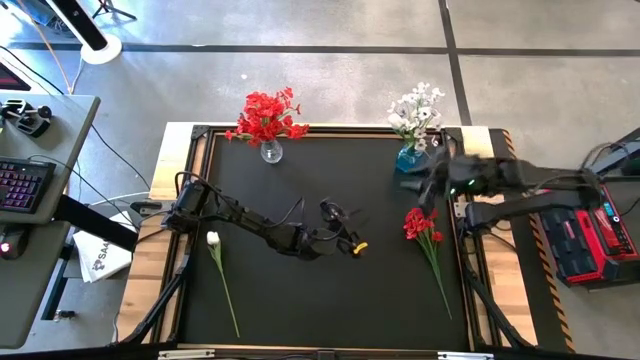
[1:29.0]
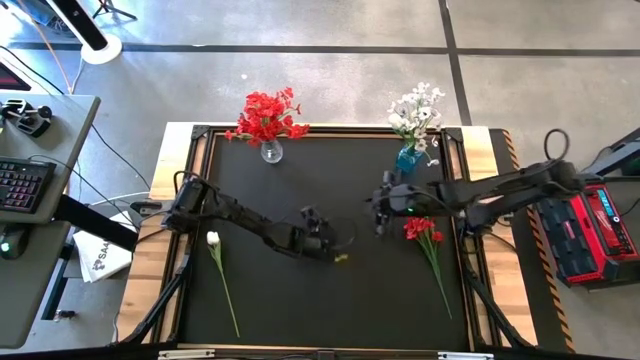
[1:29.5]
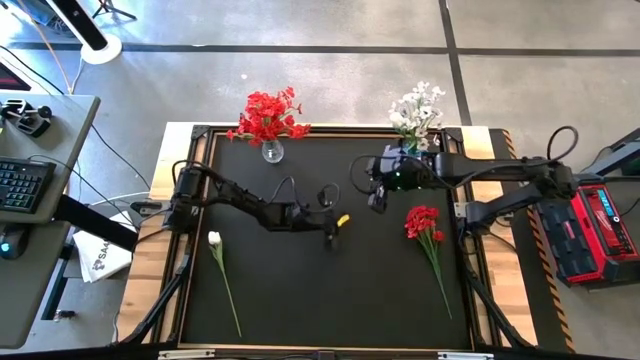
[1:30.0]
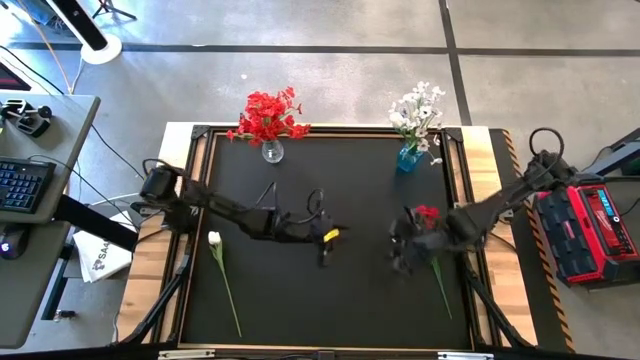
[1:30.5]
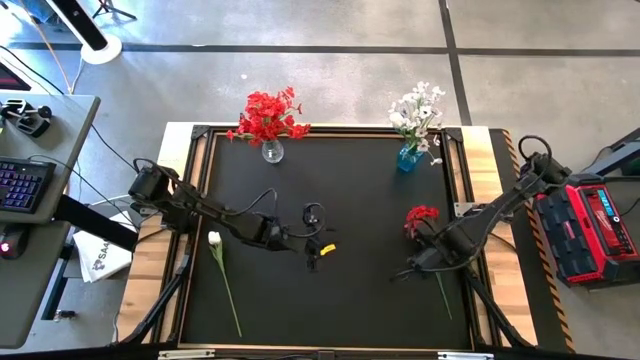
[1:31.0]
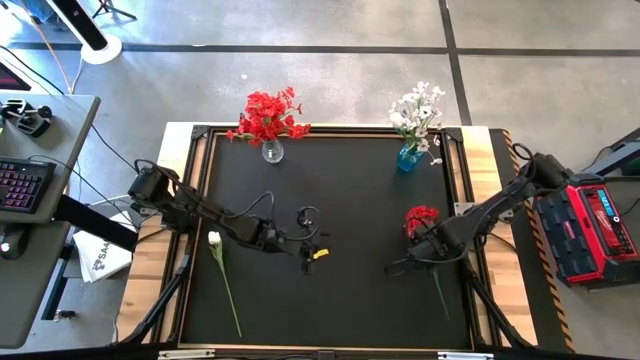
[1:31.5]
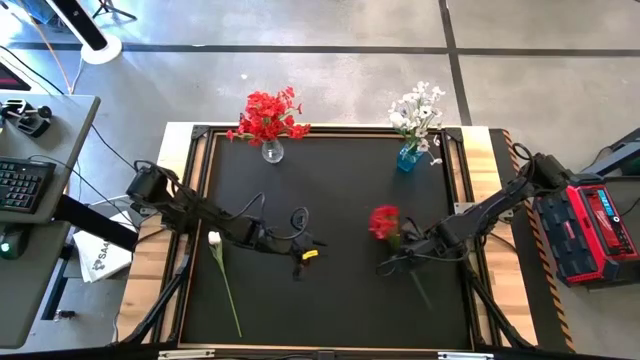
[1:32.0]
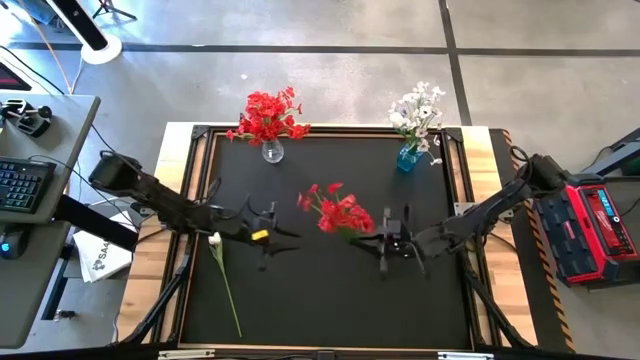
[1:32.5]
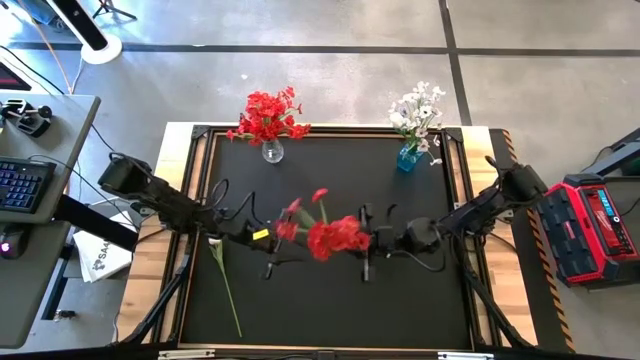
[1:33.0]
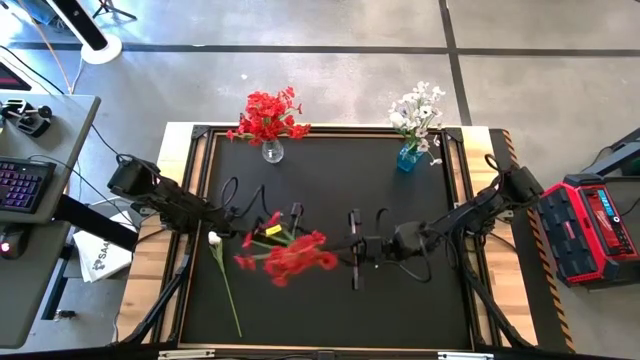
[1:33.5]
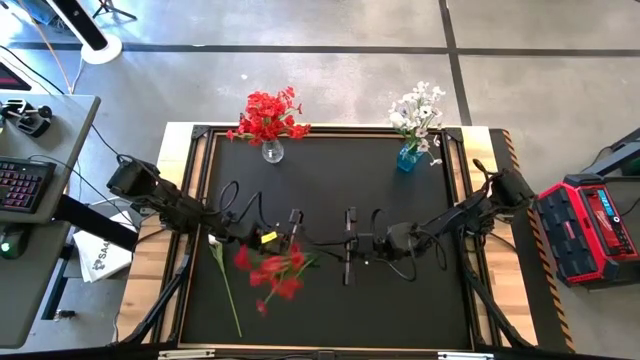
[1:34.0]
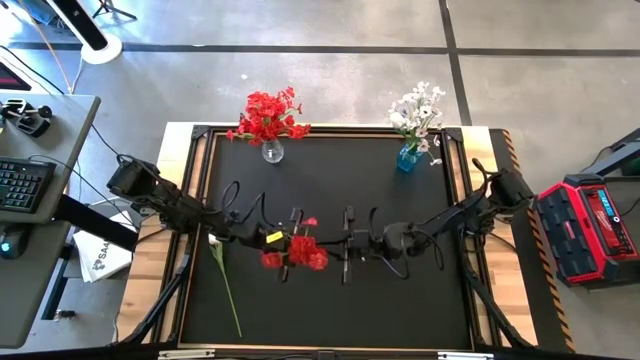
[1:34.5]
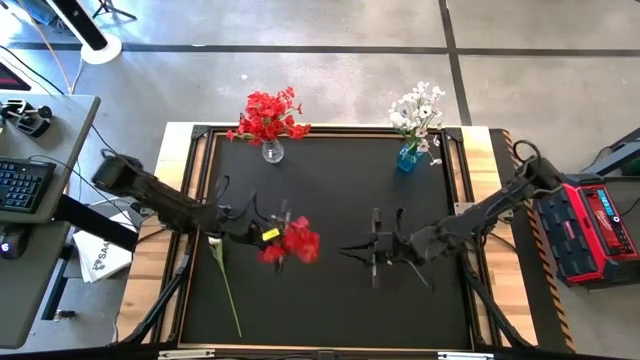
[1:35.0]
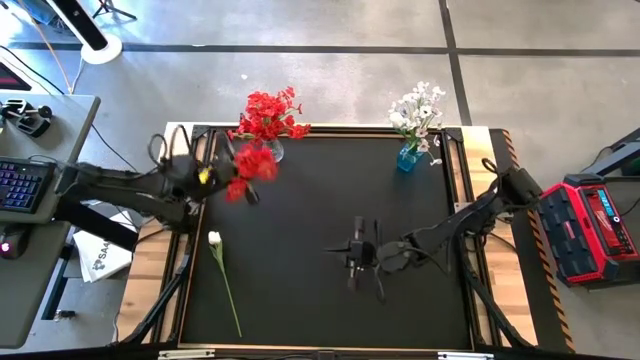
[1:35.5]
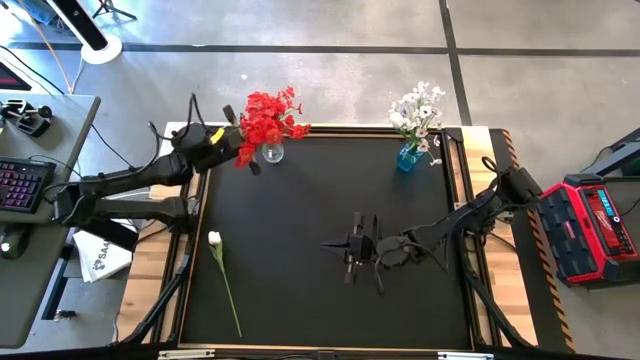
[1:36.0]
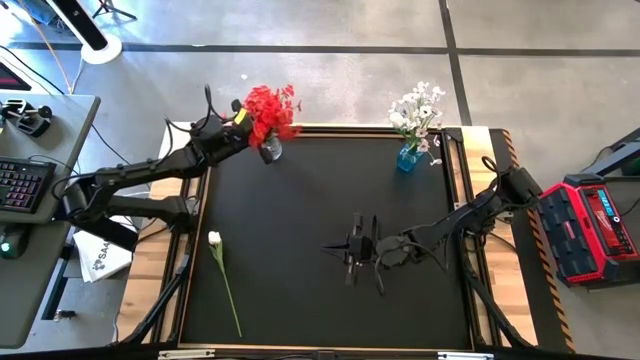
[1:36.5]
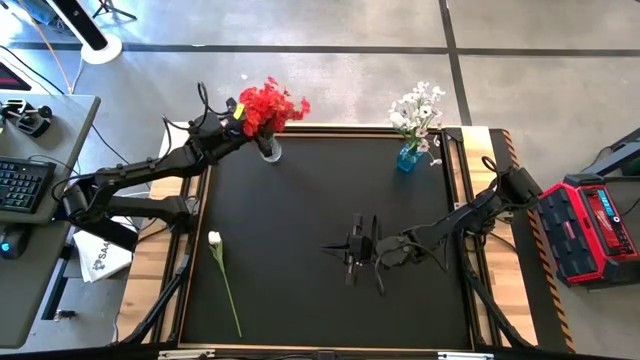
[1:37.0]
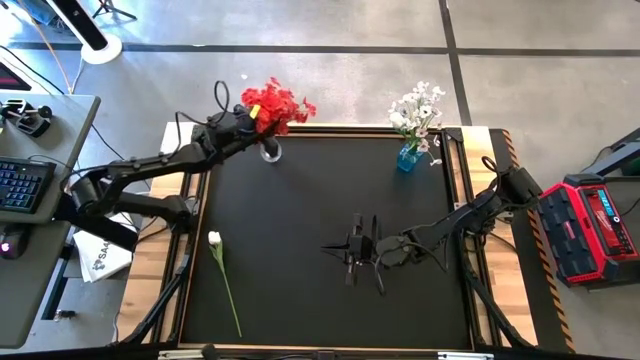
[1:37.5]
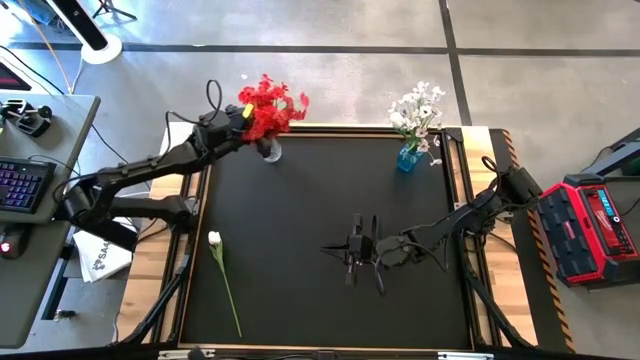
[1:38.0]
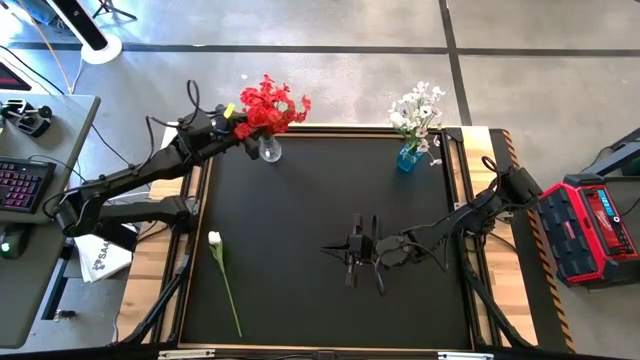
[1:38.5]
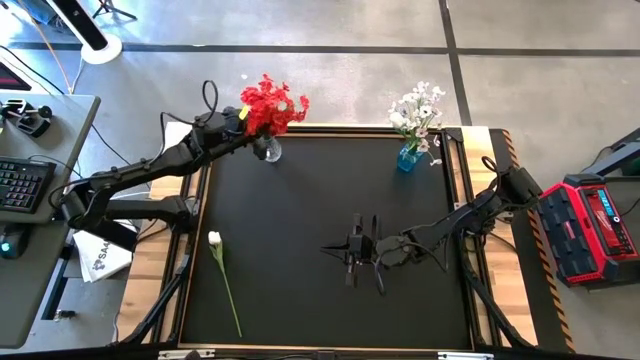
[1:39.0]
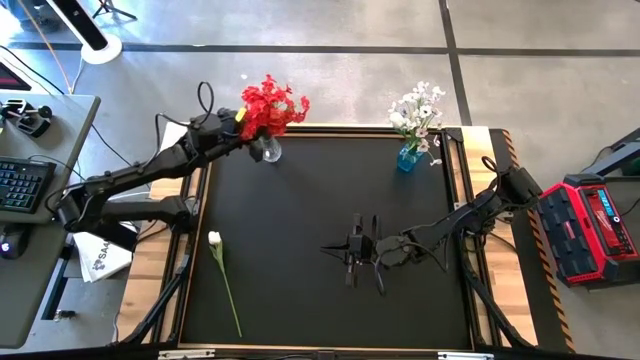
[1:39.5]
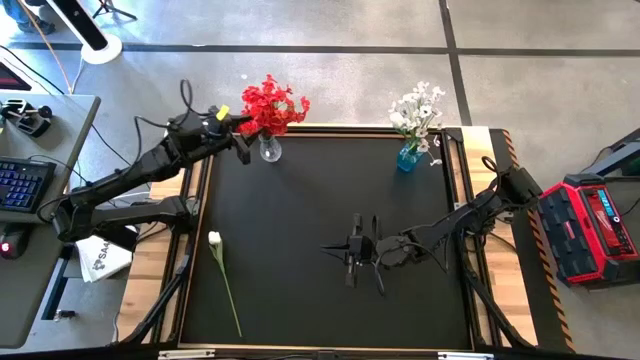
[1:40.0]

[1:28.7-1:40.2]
Task: Sort flowers into vase by color
Put the red flowers into the transparent vase

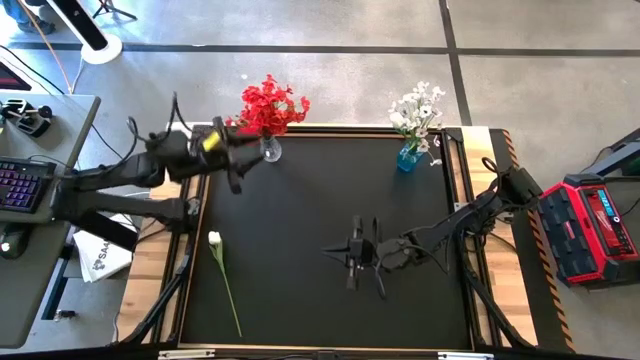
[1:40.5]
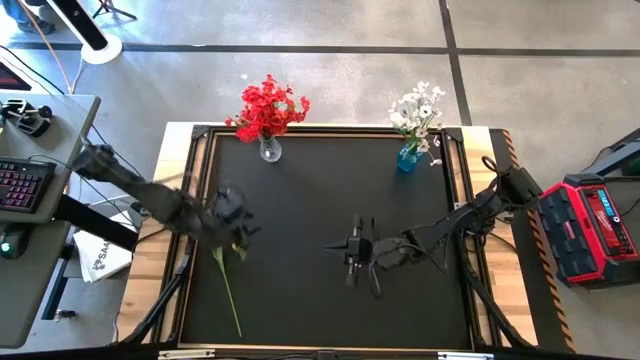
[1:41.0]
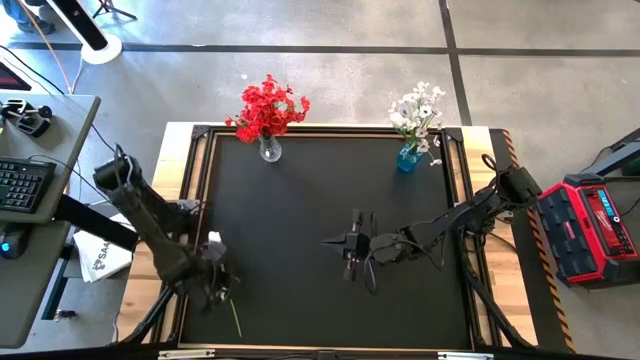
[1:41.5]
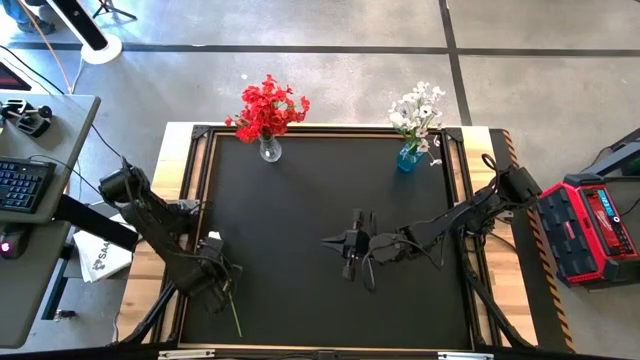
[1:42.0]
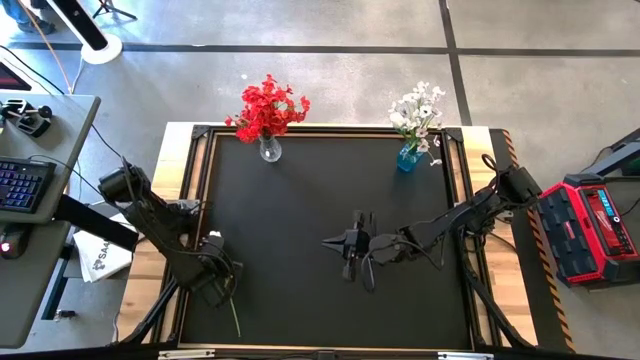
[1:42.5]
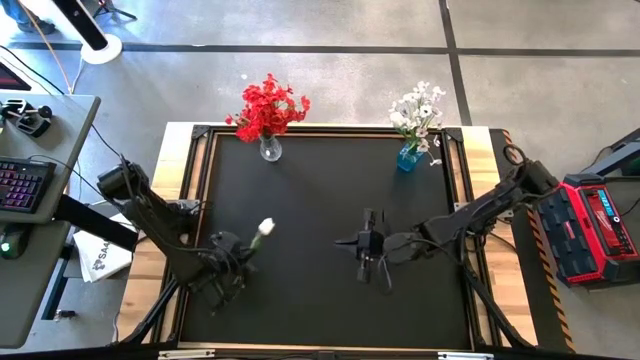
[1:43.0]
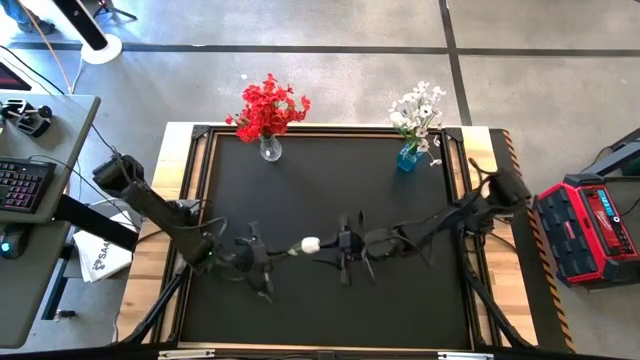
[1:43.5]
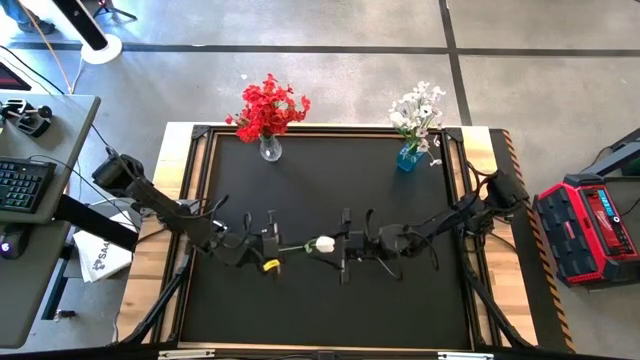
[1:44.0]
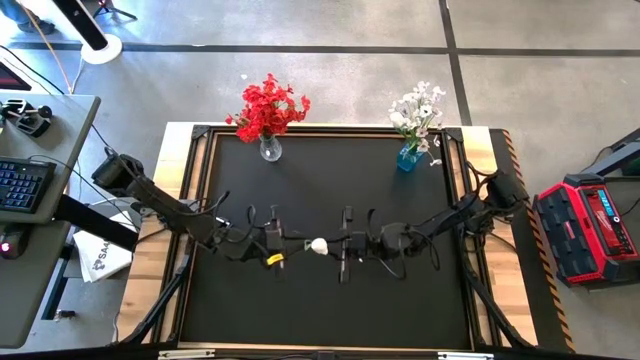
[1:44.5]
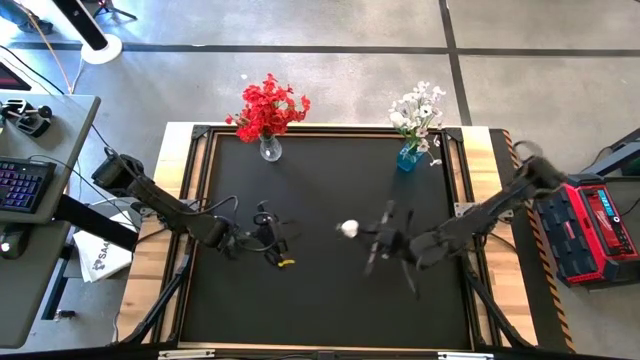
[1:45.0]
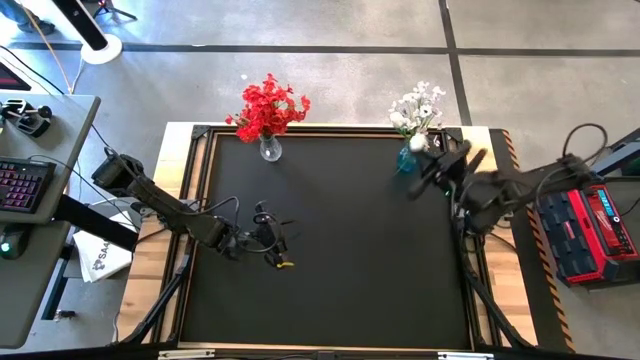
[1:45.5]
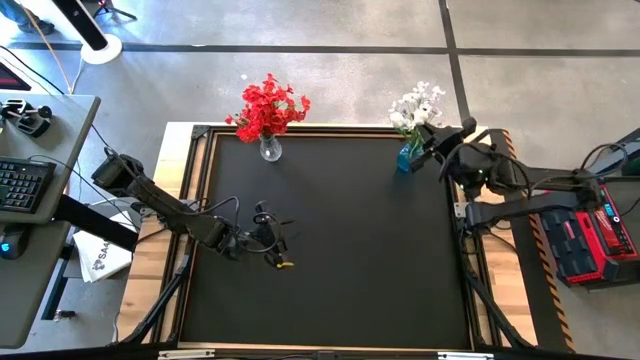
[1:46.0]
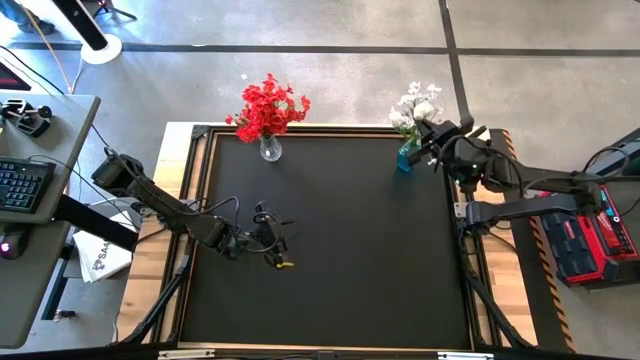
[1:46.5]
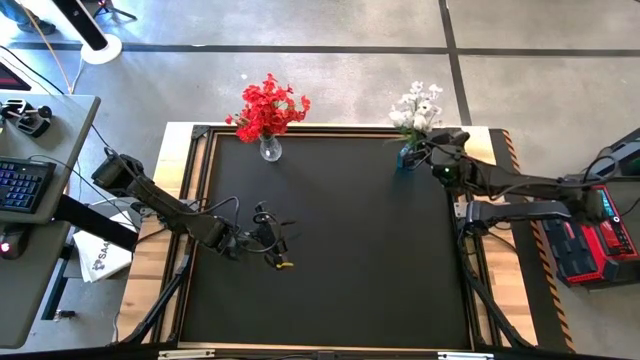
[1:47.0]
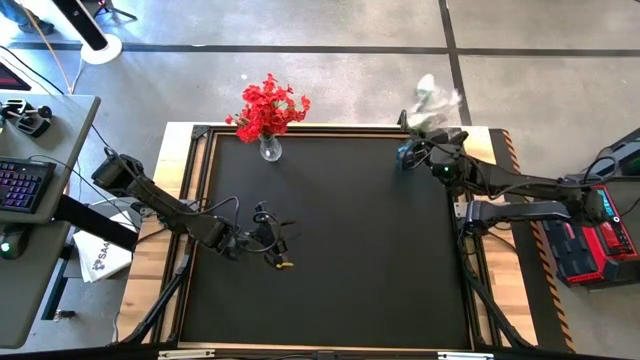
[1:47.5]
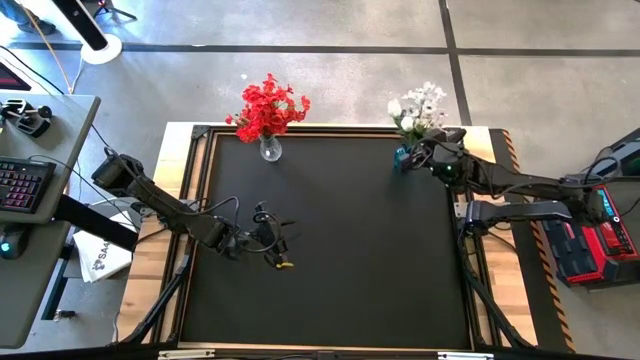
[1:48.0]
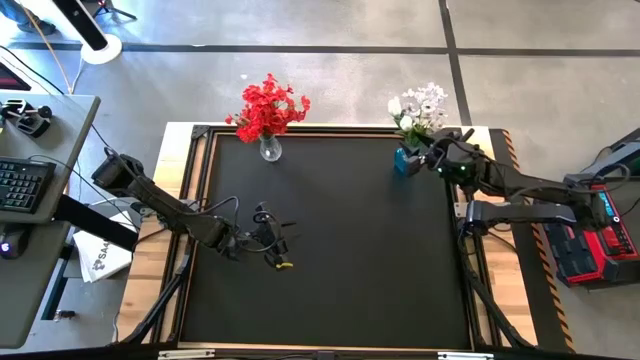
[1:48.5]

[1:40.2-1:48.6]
Put the white flower into the blue vase

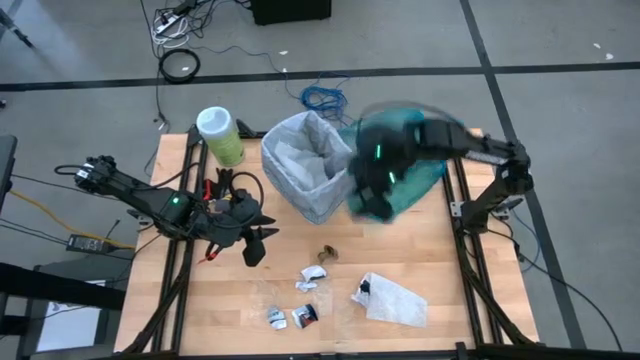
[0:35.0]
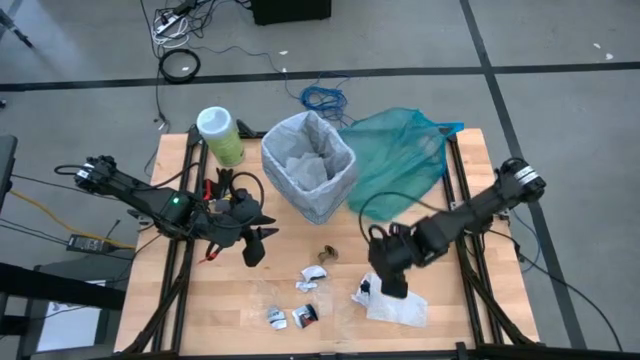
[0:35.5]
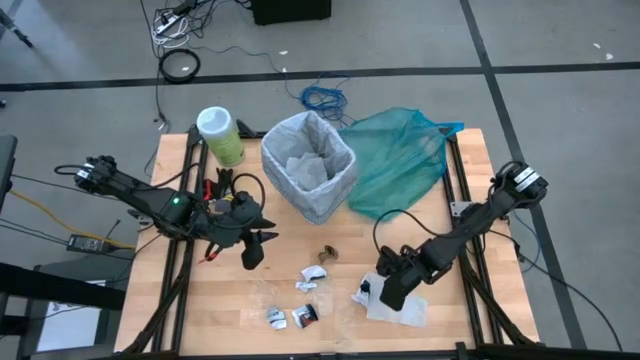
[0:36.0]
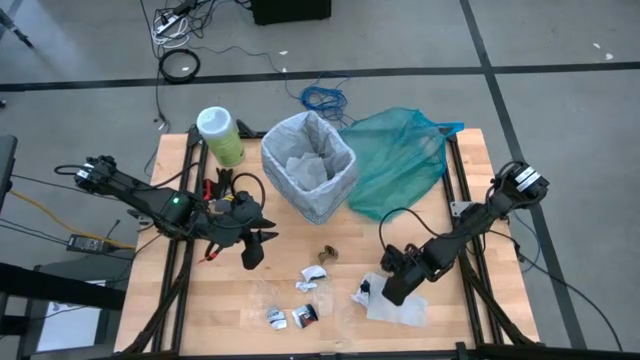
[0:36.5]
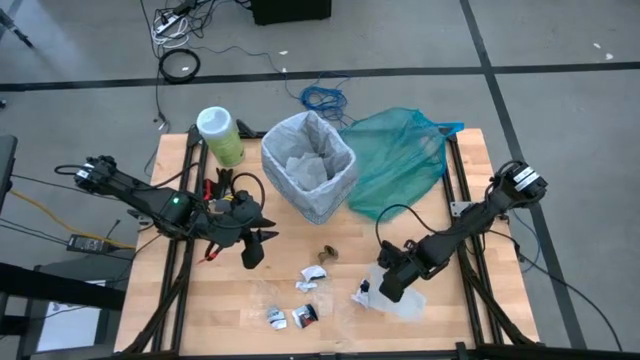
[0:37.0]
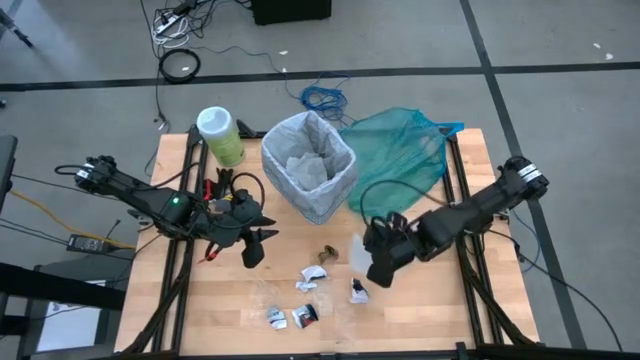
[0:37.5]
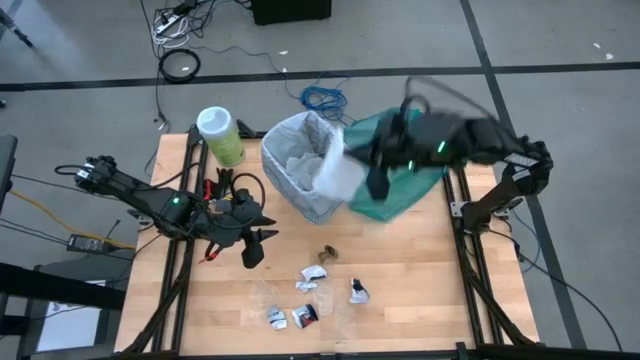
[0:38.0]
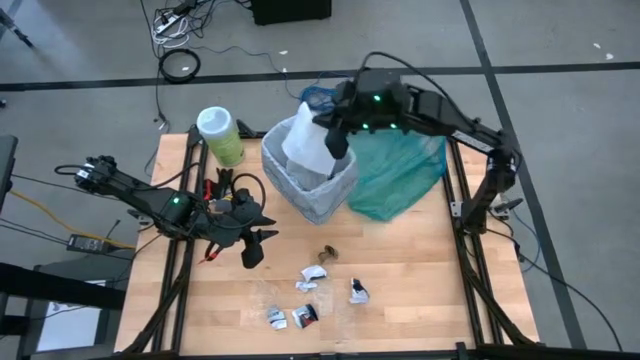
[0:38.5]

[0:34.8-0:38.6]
Task: place trash/remove bag and relplace
Put the white tissue paper into the trash bin
